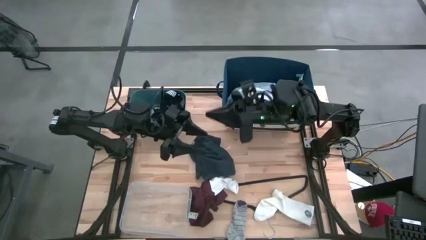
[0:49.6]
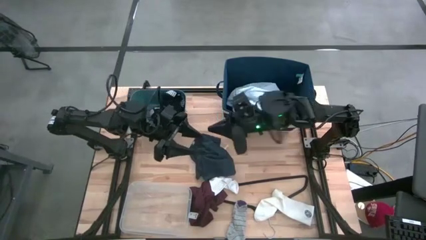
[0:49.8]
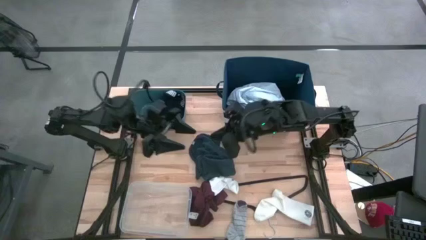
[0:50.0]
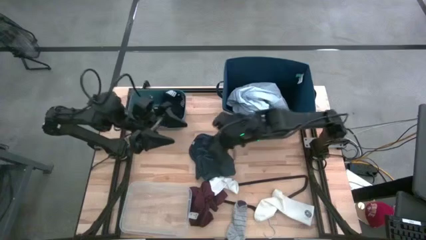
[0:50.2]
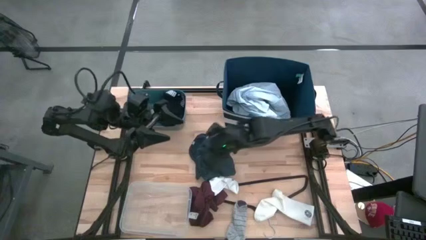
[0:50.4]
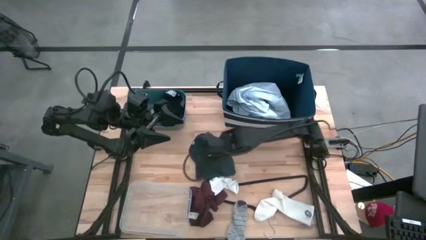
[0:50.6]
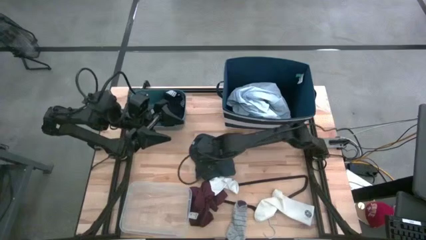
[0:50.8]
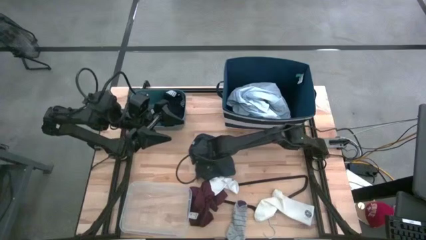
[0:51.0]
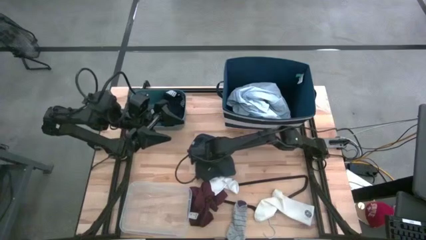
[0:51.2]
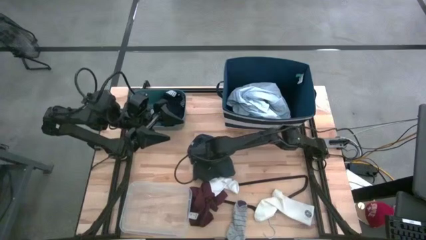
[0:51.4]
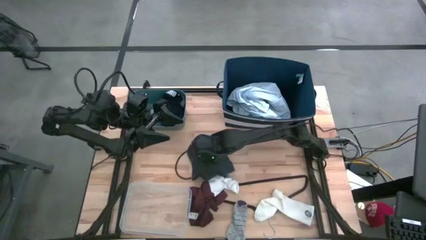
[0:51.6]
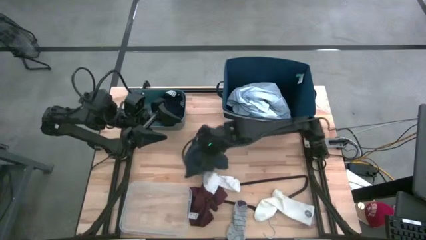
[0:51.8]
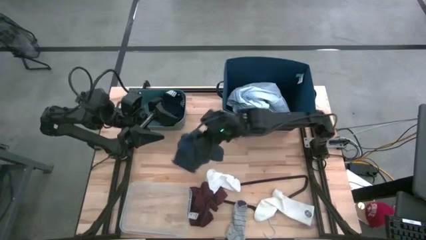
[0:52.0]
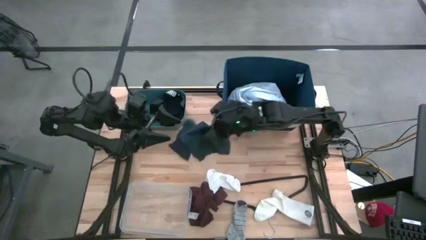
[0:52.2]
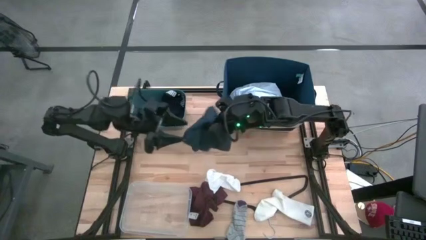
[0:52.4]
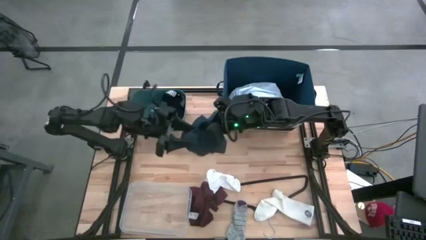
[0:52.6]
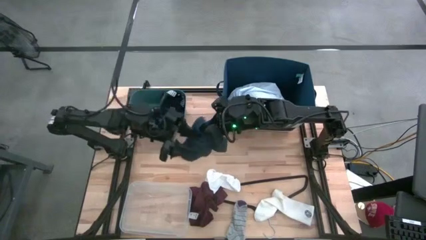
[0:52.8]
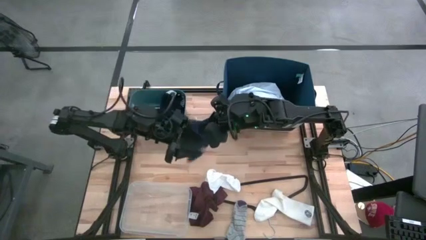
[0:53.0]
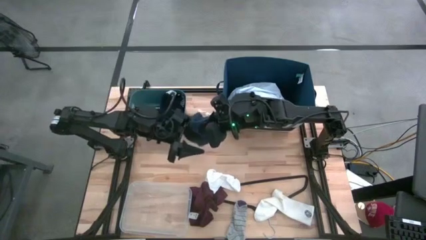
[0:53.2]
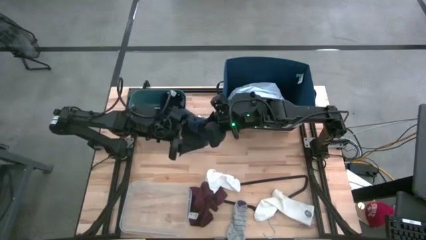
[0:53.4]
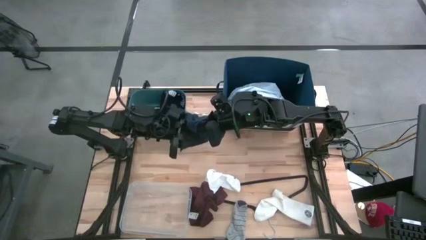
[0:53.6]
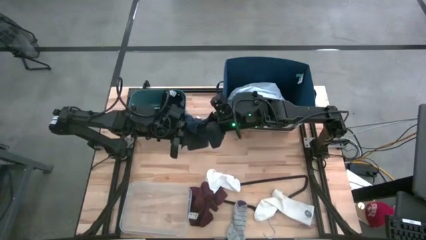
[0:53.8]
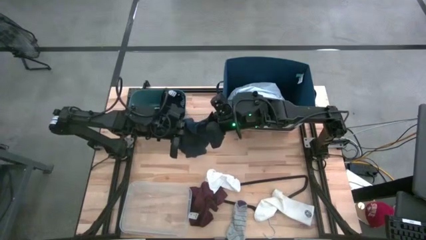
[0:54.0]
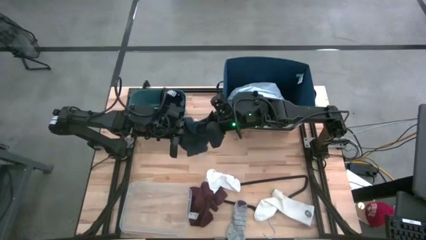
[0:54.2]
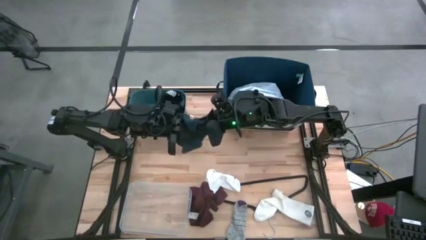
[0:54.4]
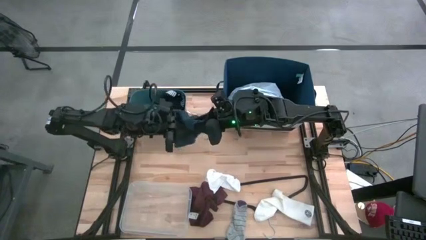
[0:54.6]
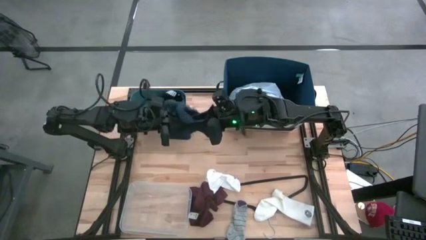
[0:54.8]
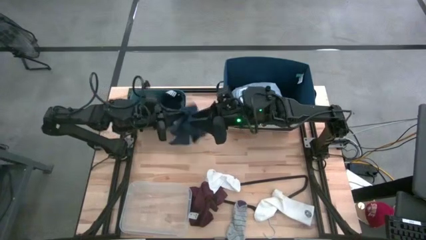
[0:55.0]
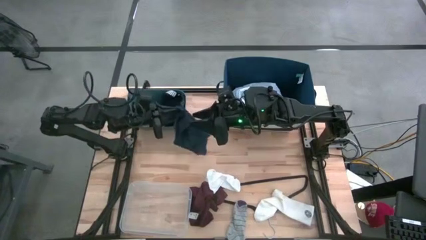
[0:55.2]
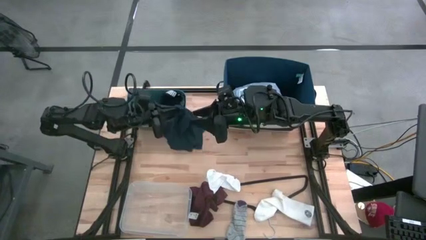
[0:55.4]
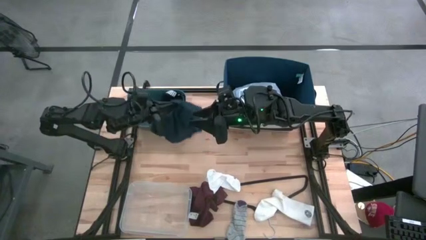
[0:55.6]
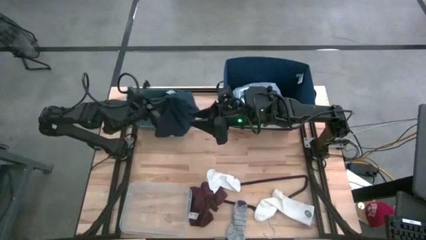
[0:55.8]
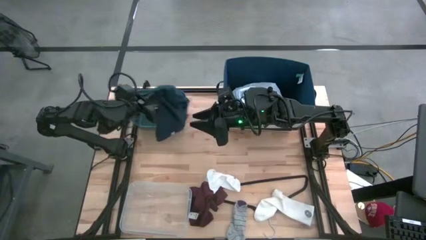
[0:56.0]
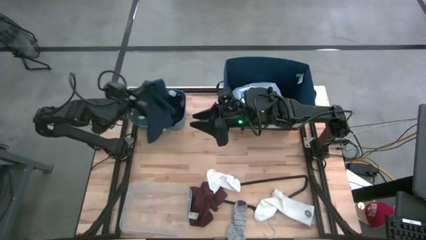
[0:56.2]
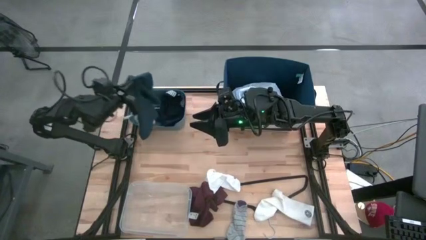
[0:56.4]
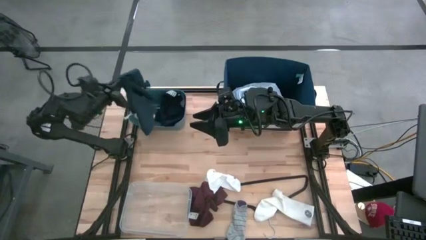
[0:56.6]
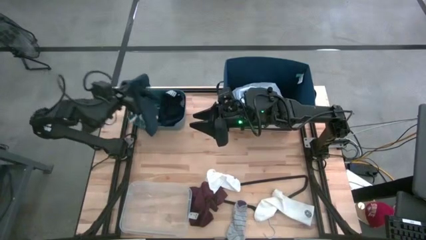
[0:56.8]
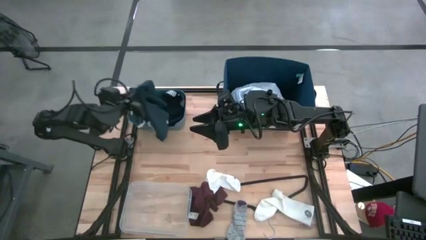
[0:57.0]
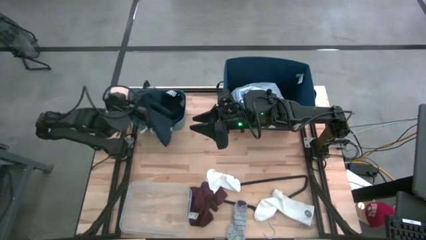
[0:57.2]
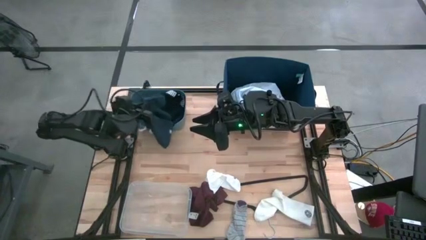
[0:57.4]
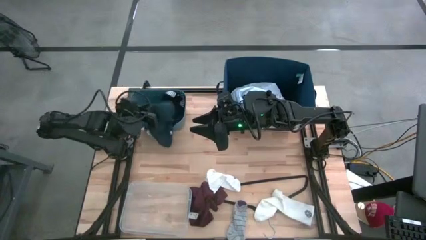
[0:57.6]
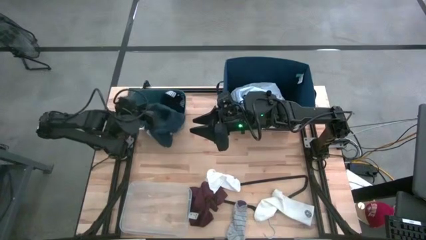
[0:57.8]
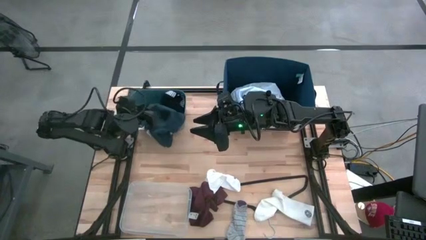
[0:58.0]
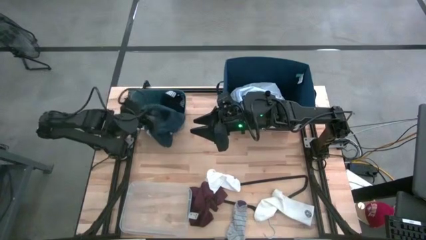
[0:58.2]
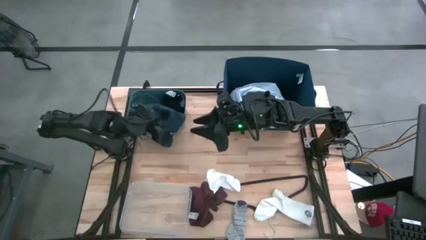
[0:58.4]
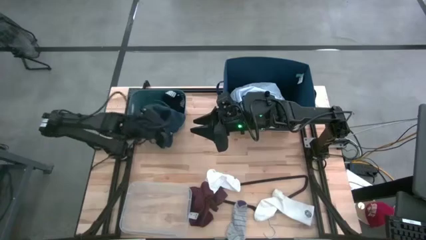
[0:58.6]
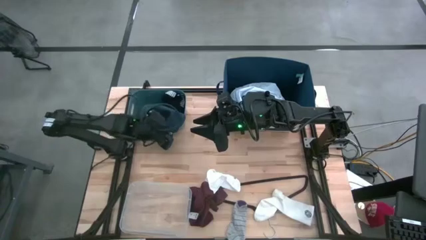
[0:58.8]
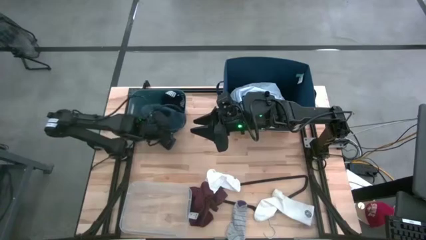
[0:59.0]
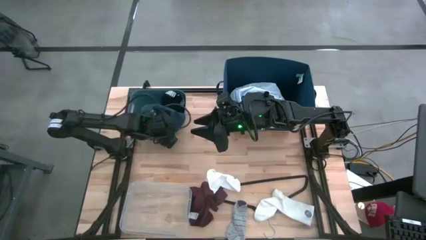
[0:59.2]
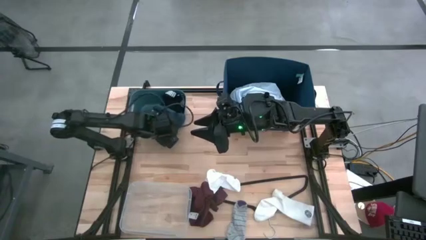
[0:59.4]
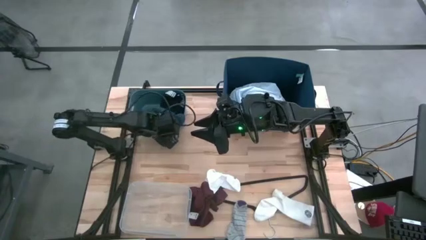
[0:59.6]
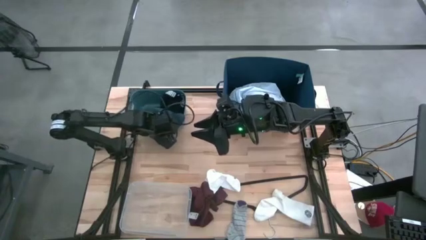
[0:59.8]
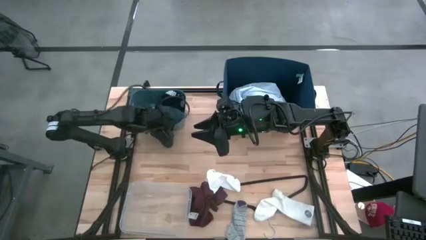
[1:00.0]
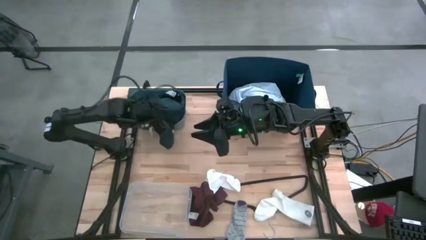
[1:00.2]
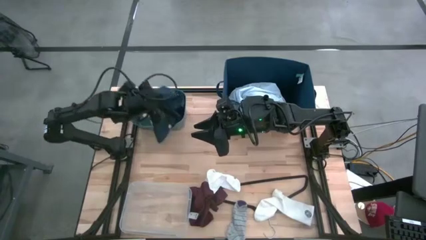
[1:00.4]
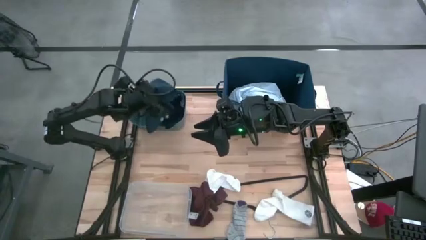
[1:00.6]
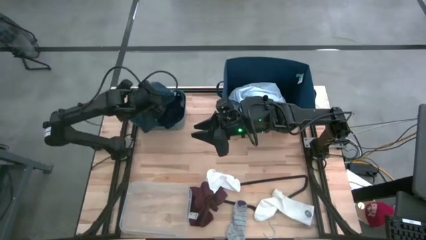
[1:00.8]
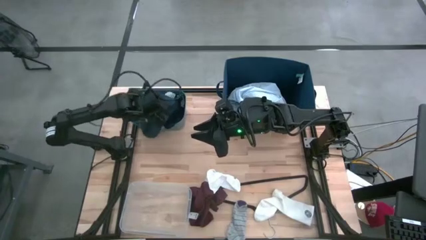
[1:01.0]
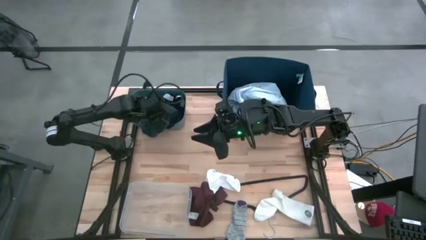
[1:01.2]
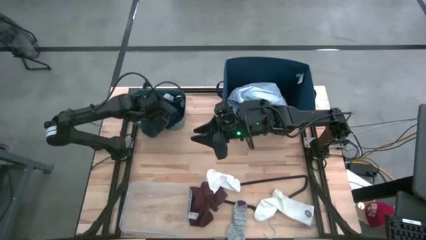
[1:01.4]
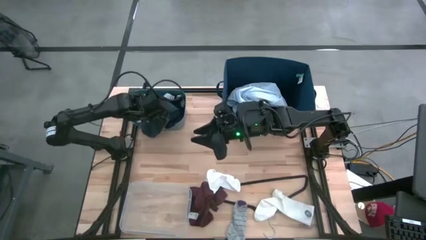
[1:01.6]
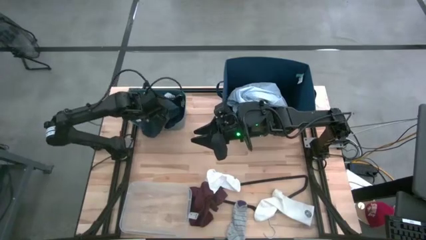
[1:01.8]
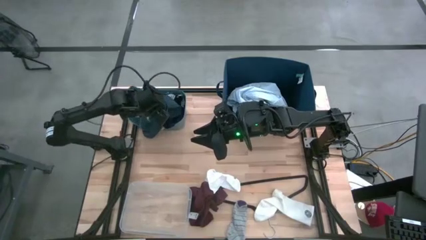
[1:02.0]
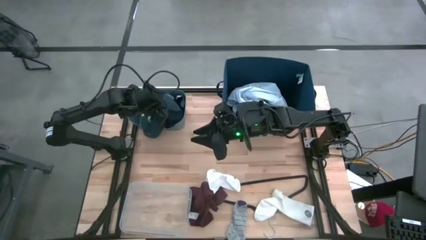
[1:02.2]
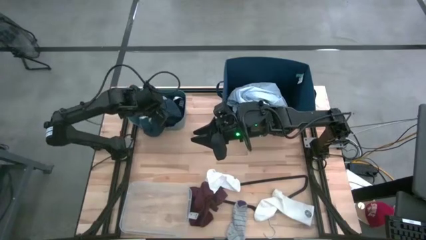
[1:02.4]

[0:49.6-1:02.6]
Task: Pick & Place Cloths
Put the dark blue pants into the green bin

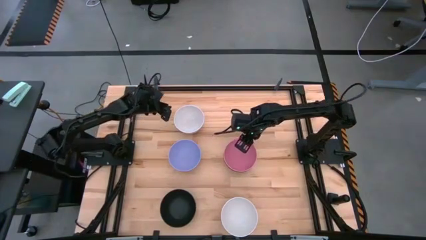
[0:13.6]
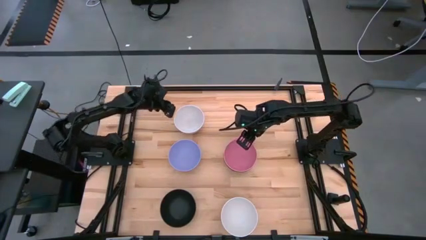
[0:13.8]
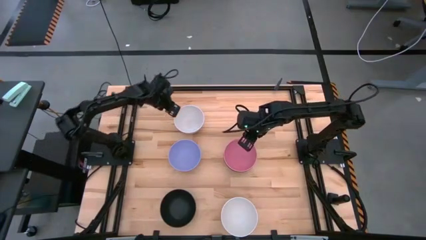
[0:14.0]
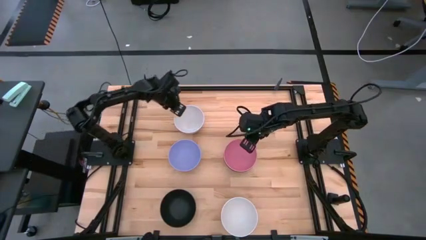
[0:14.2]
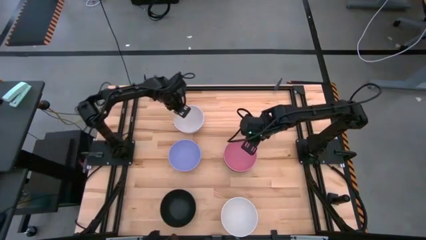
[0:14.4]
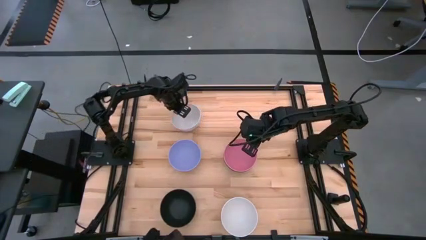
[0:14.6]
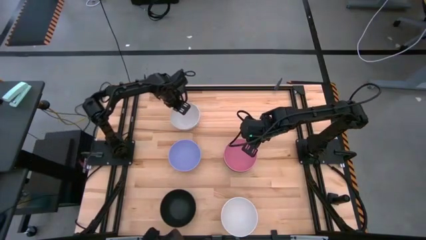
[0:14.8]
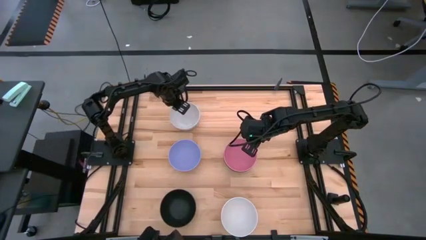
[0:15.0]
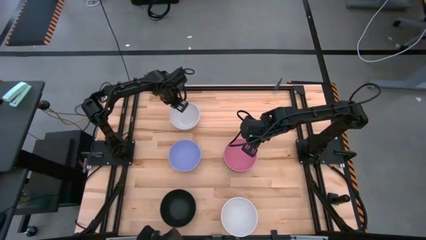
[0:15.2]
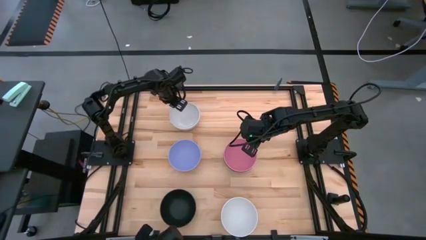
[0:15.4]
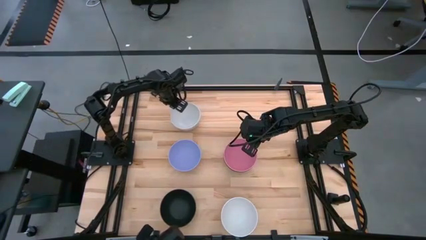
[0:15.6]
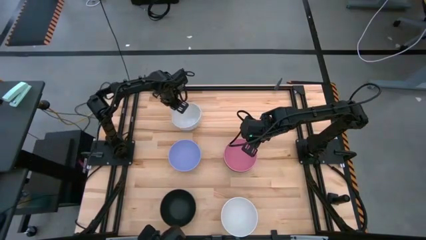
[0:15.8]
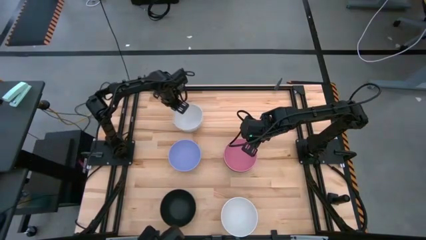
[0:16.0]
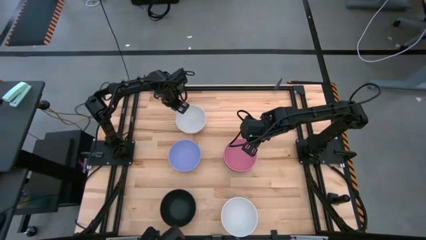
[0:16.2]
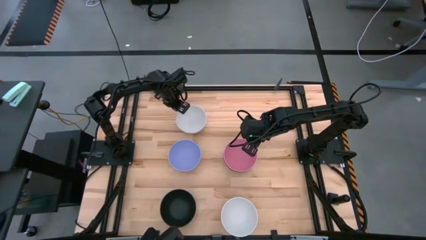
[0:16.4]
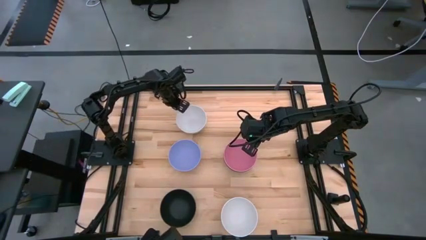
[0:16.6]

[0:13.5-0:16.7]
Task: Nest bowls inside each other
Stack the top white bowl on top of the purple bowl
